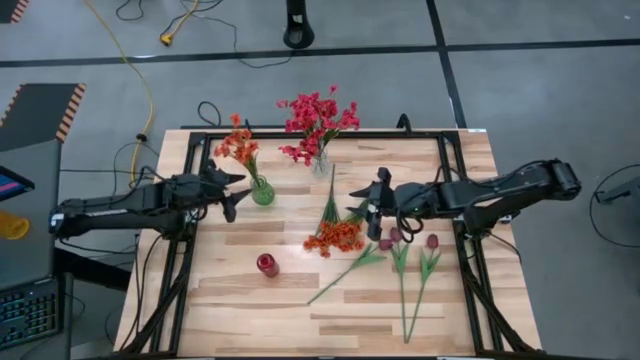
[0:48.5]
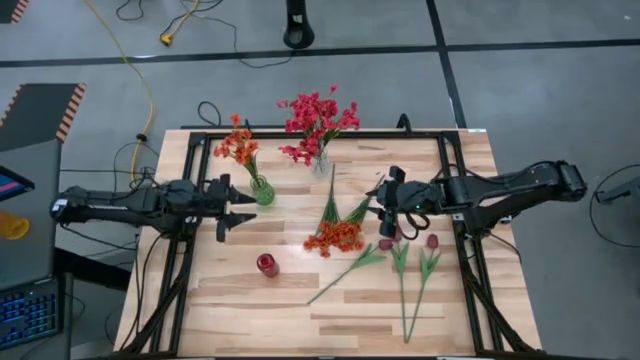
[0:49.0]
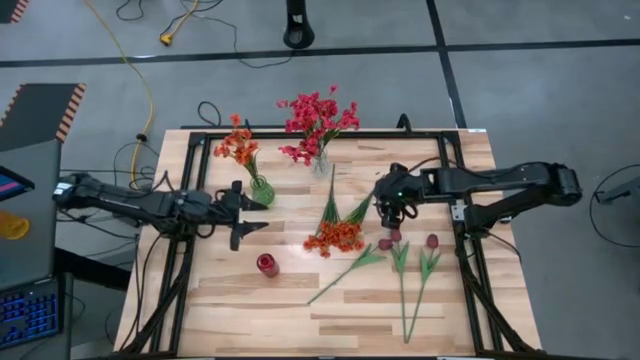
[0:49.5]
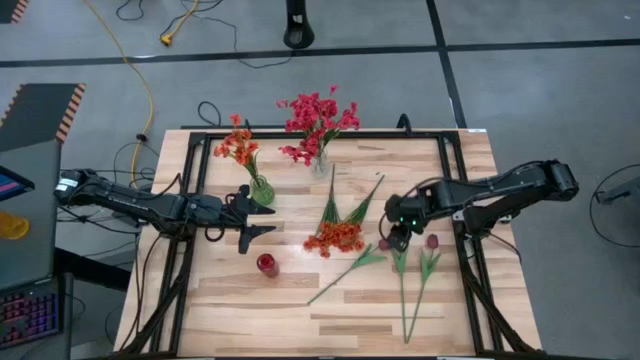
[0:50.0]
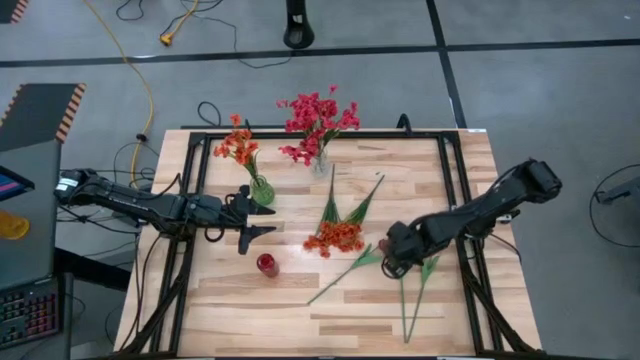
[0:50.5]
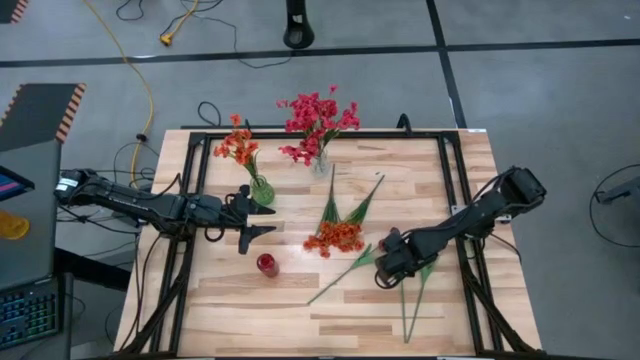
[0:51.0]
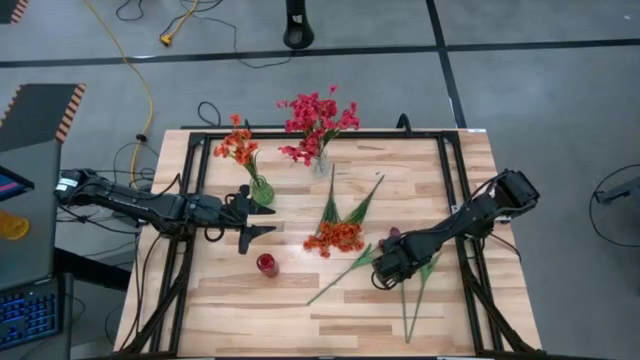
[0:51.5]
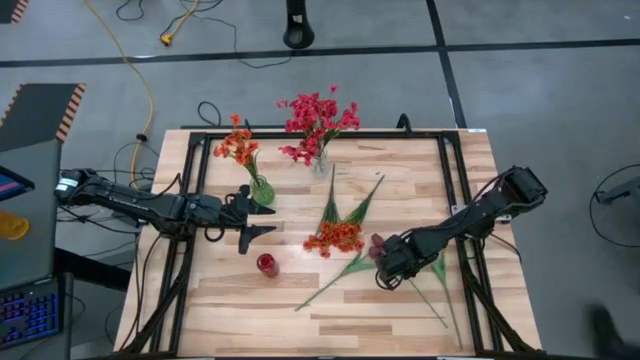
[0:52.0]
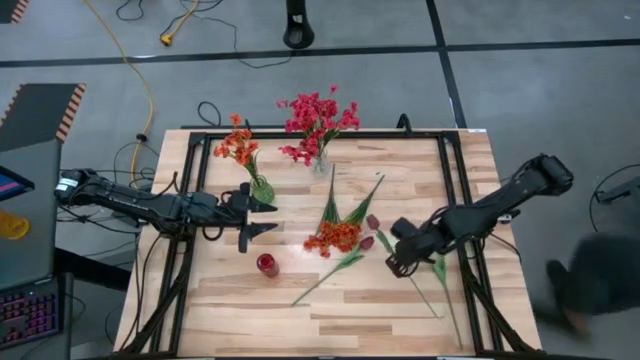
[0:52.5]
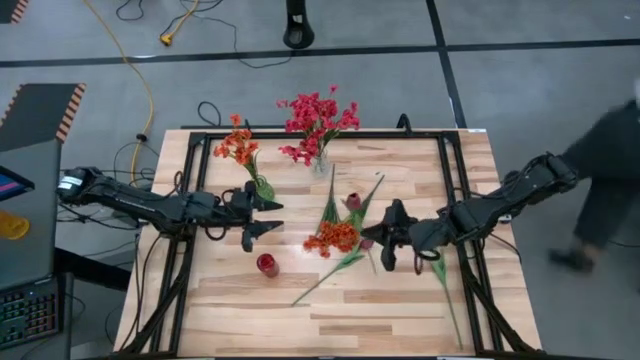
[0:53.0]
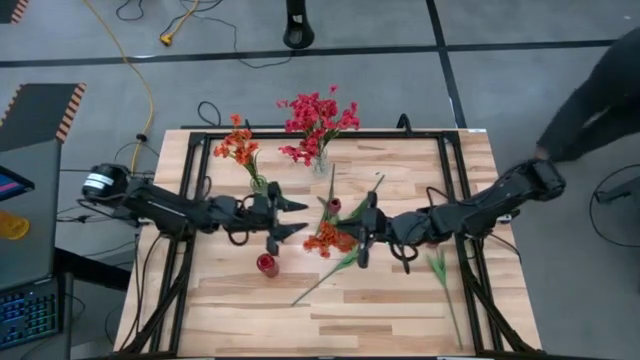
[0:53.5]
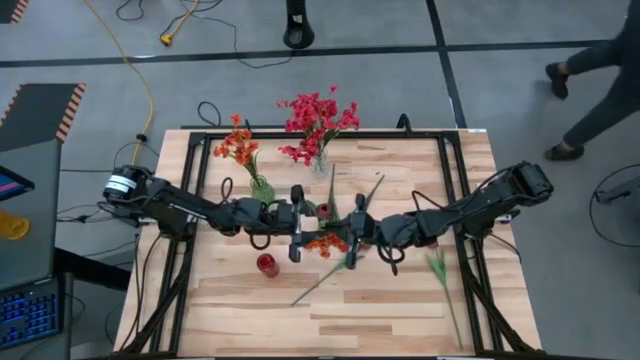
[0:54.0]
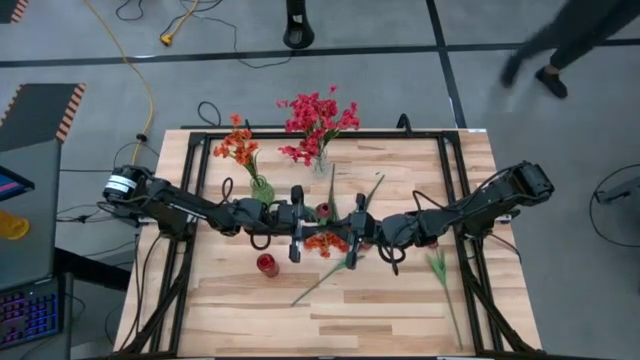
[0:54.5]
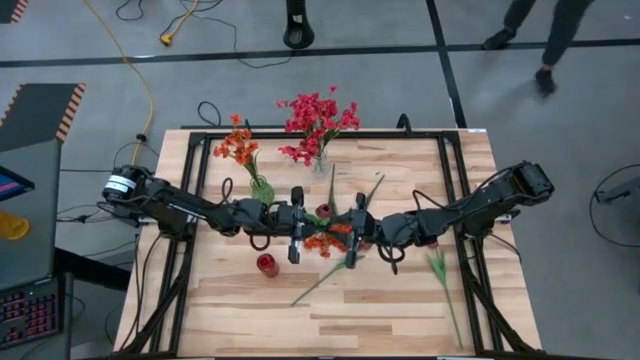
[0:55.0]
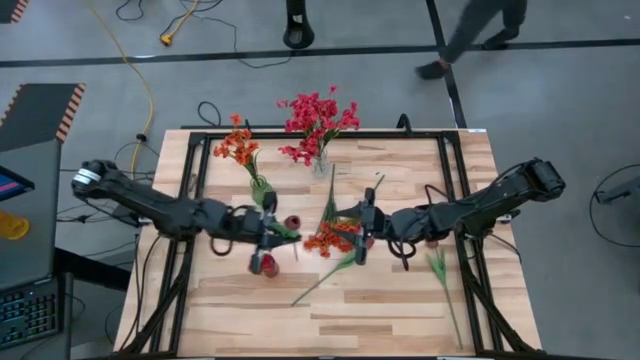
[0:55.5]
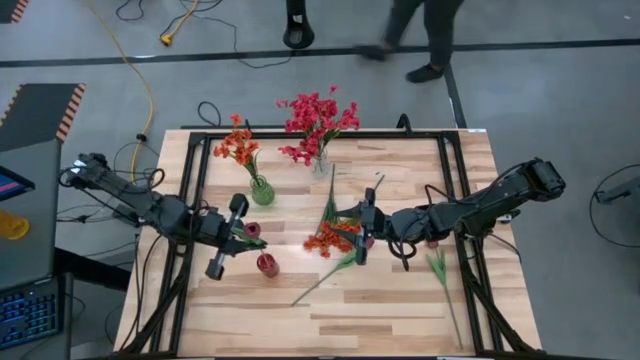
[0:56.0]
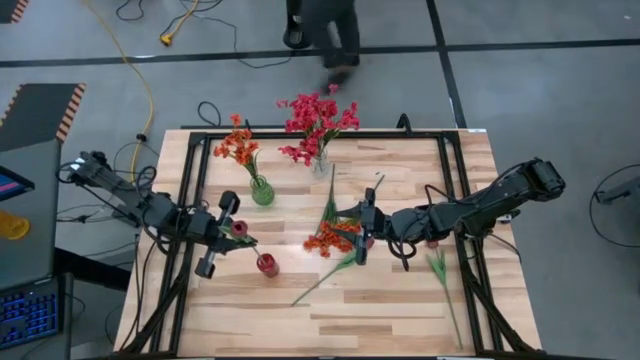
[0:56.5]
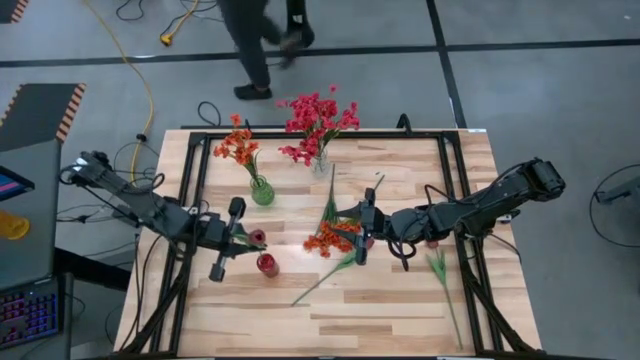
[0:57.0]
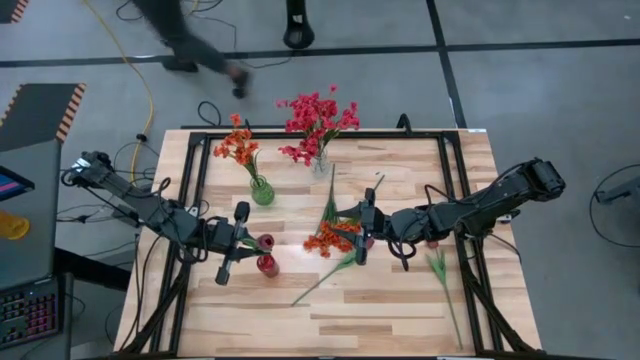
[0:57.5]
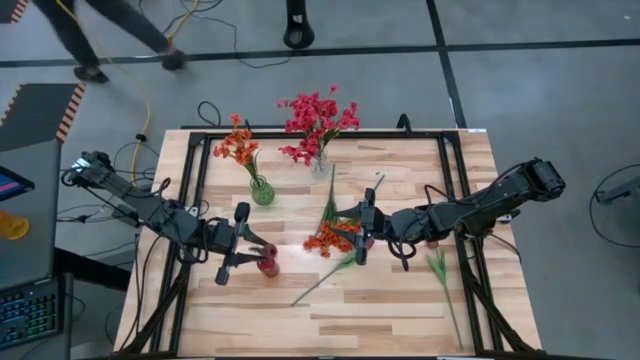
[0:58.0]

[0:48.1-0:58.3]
Task: Sort flowers into vase by color
Put the center red tulip into the red vase

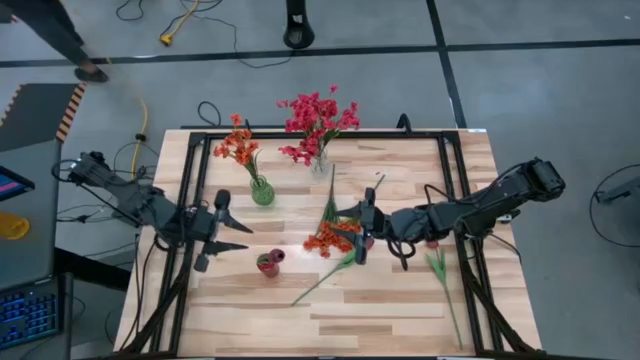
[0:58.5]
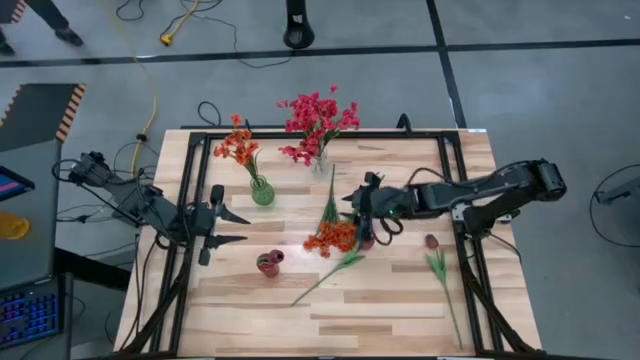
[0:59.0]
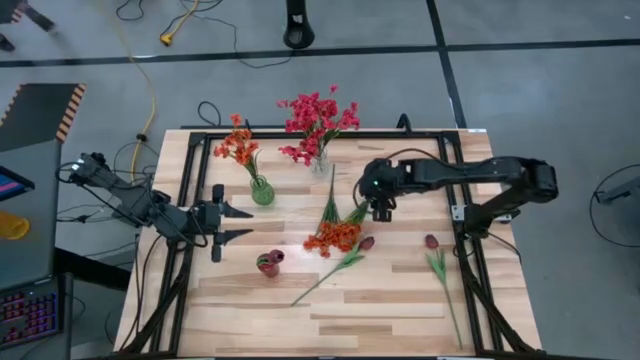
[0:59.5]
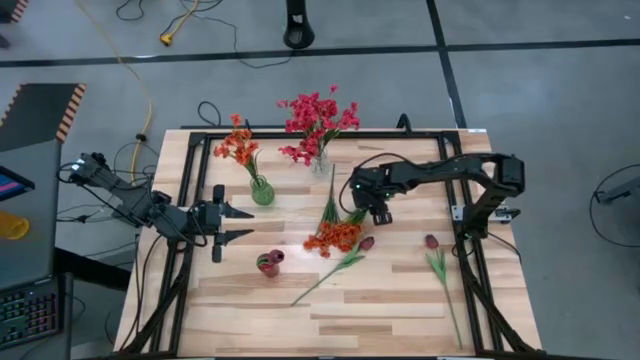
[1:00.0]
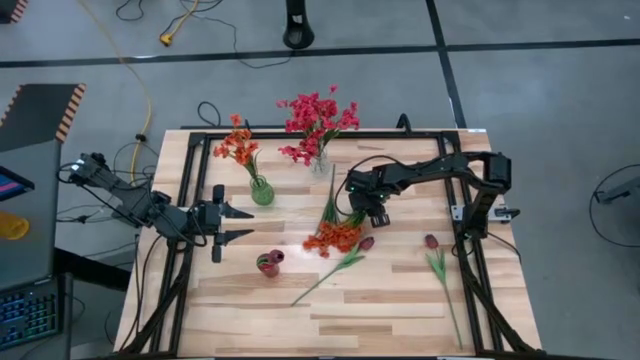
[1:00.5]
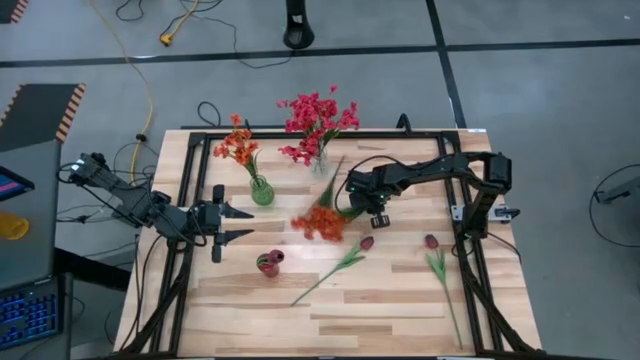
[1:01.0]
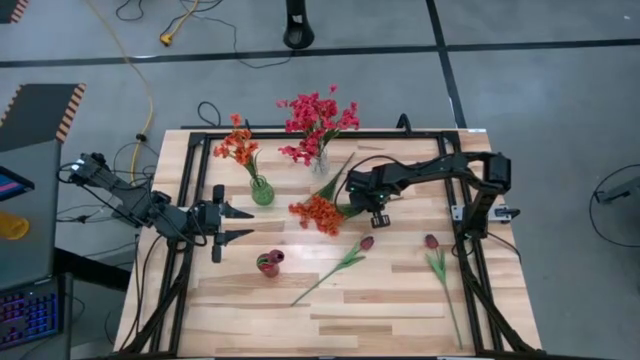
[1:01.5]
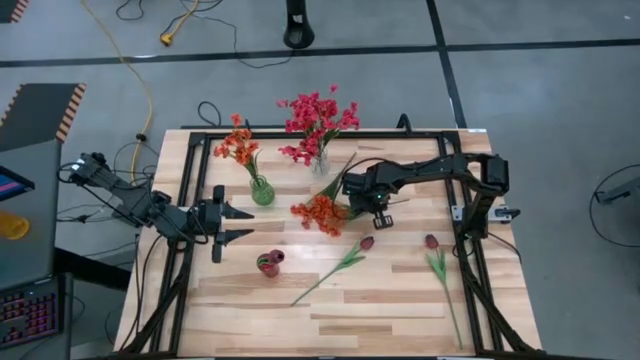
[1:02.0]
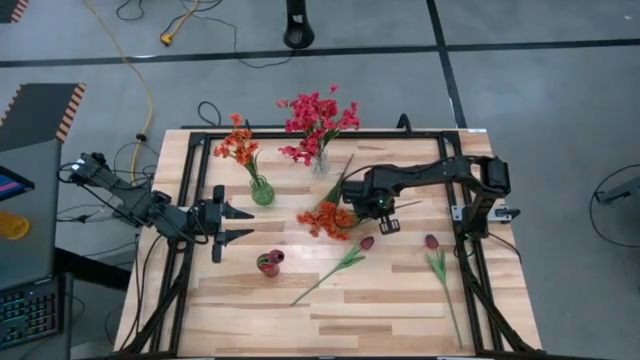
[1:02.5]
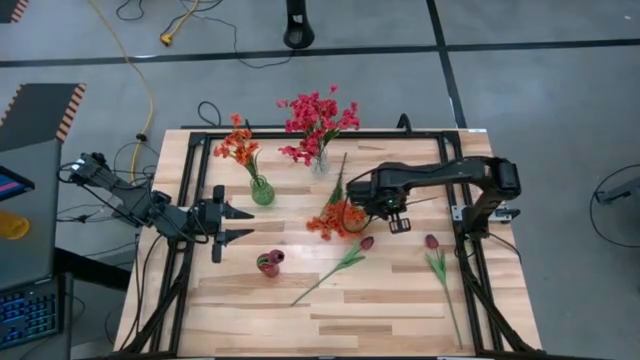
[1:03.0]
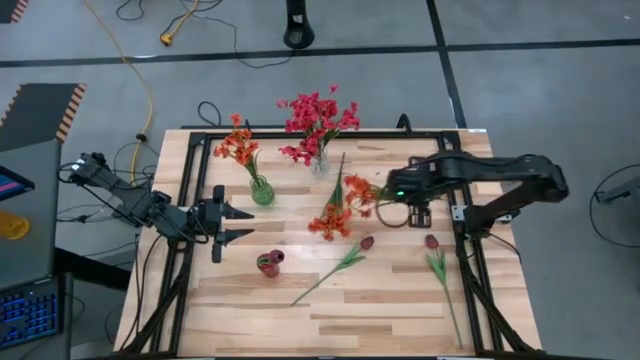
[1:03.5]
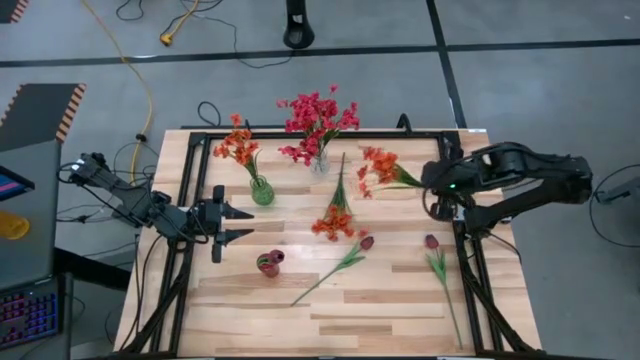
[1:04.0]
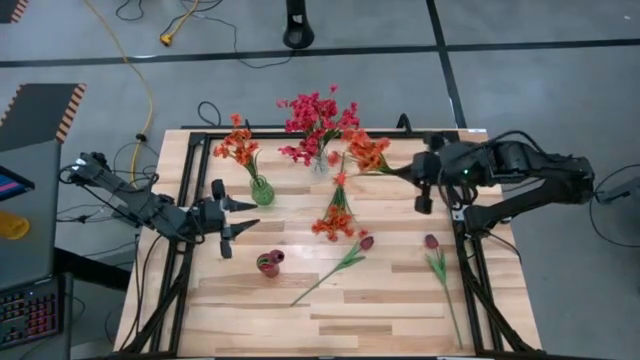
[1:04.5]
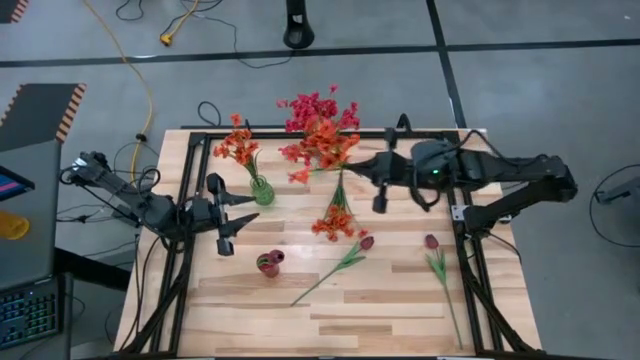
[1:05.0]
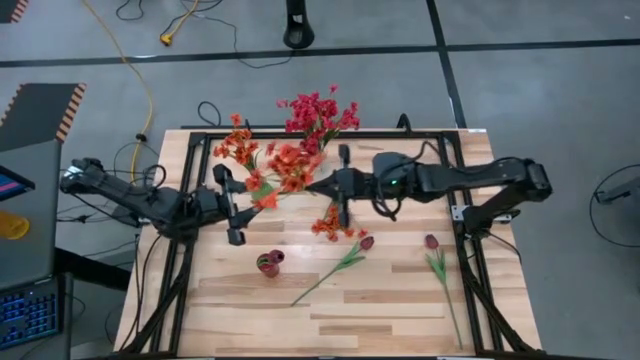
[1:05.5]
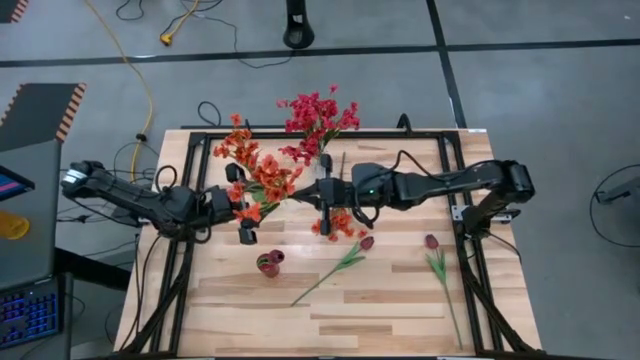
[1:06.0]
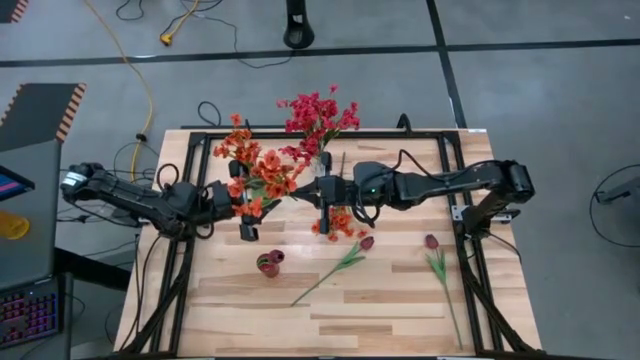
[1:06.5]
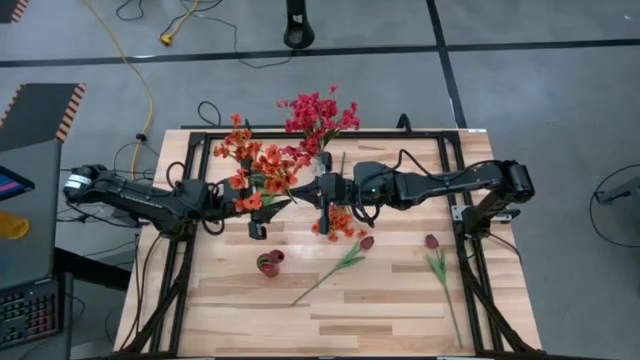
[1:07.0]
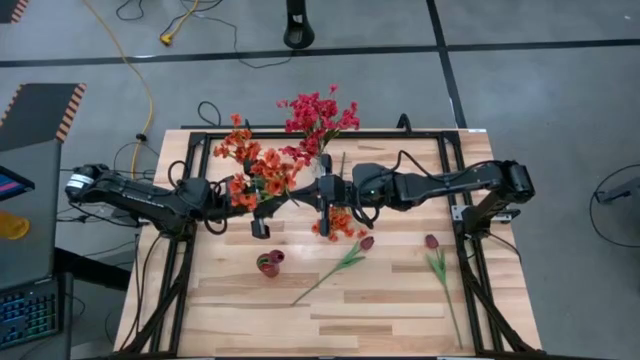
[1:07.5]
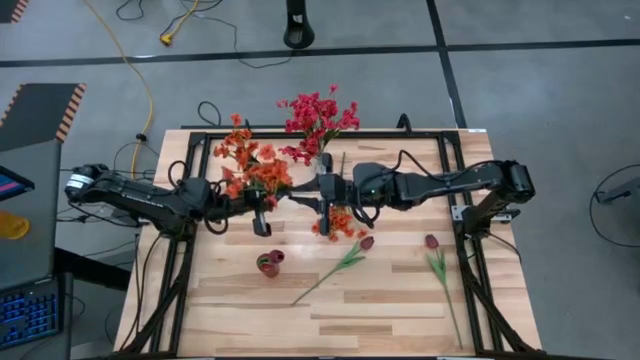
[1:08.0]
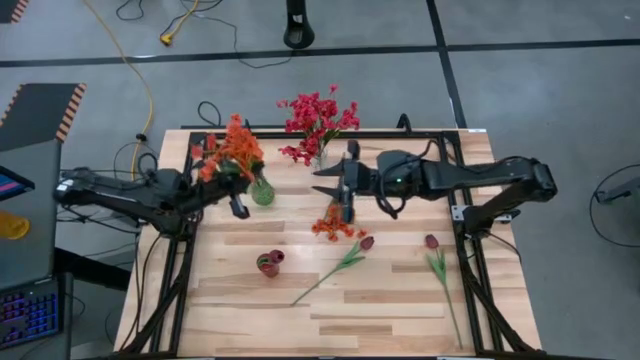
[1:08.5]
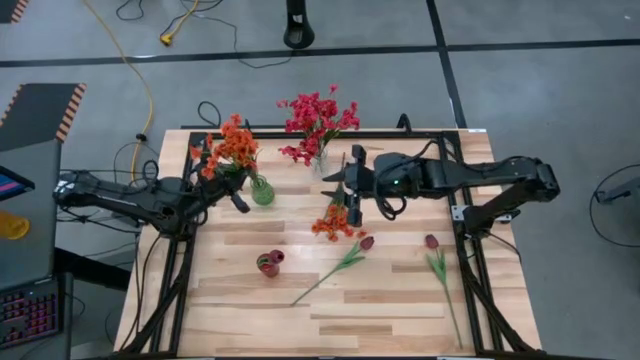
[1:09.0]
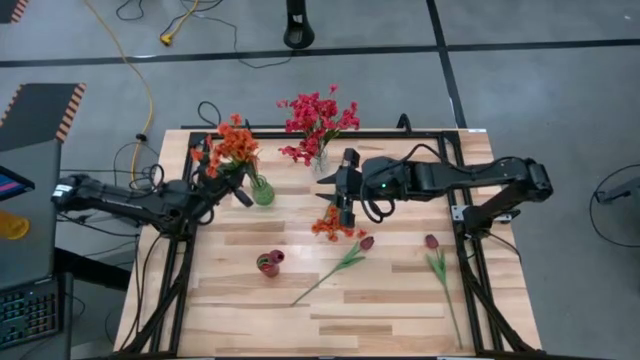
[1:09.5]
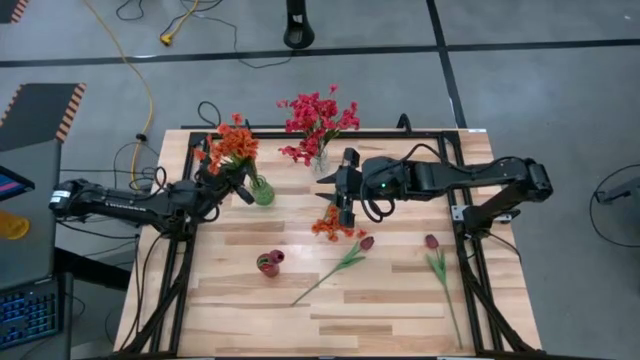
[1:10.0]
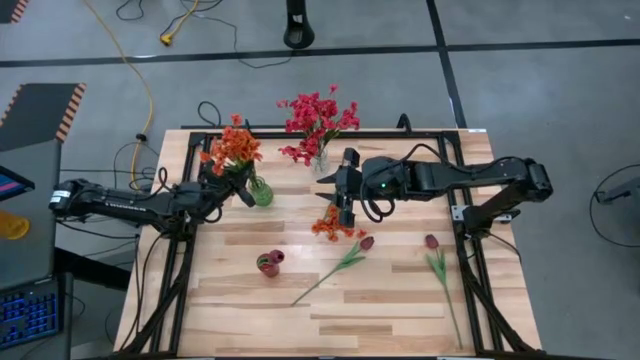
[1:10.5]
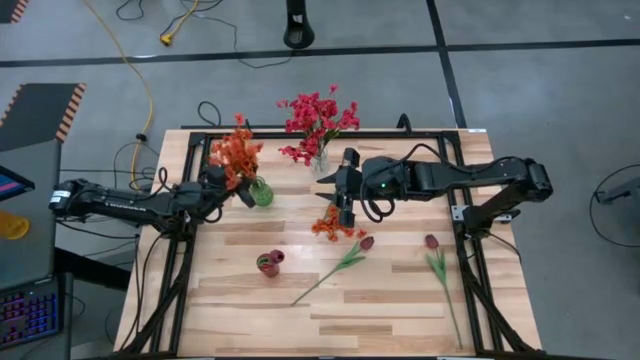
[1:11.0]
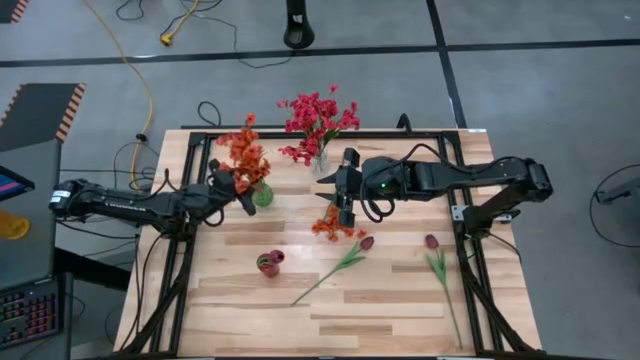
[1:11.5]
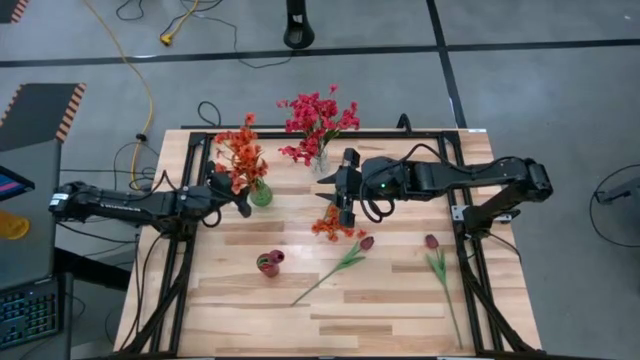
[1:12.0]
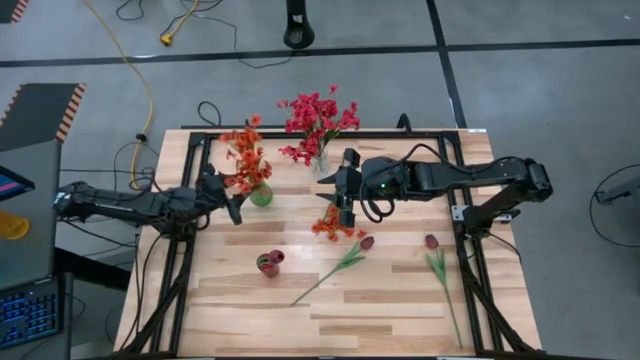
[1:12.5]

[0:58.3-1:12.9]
Put the right orange flower into the green vase
